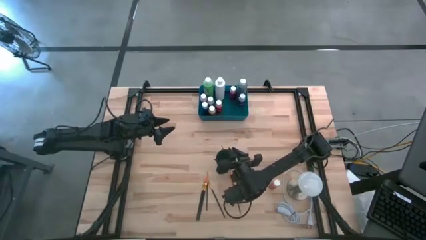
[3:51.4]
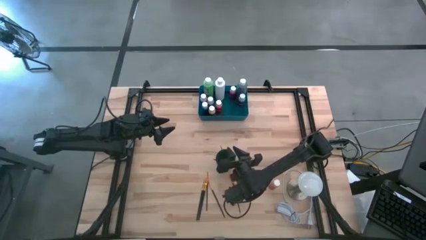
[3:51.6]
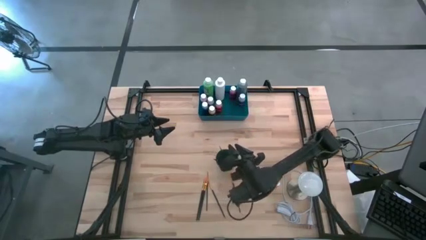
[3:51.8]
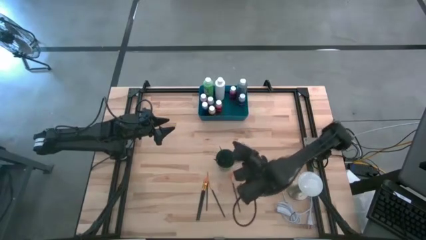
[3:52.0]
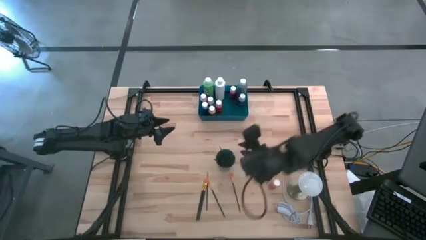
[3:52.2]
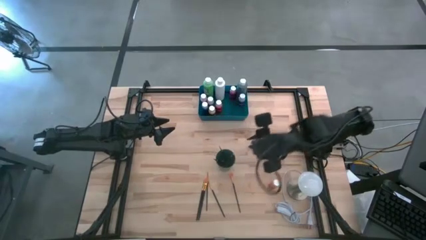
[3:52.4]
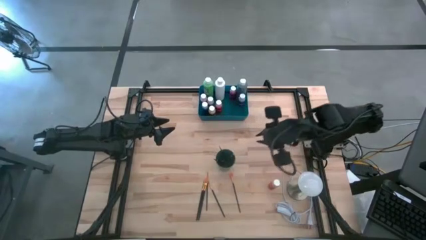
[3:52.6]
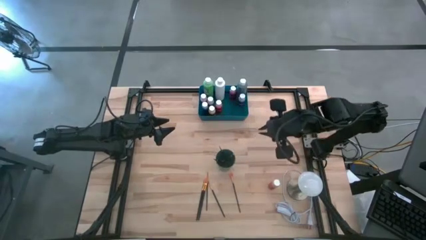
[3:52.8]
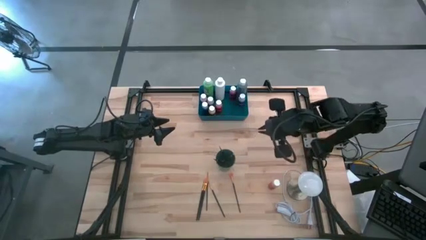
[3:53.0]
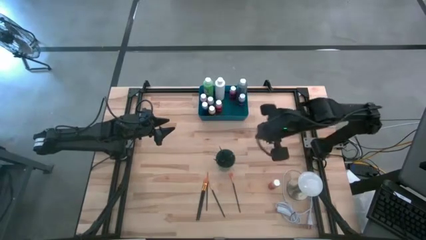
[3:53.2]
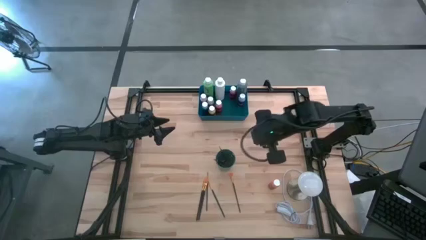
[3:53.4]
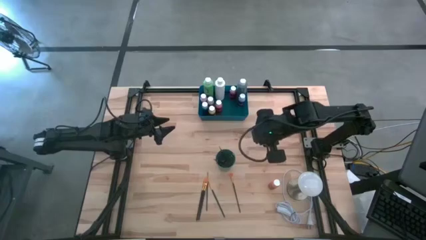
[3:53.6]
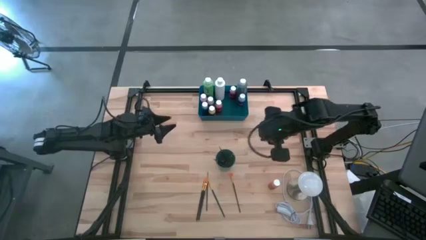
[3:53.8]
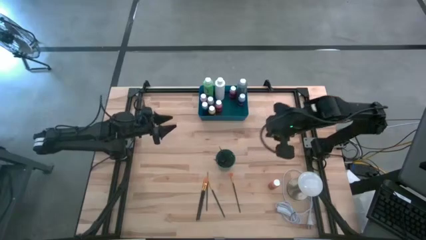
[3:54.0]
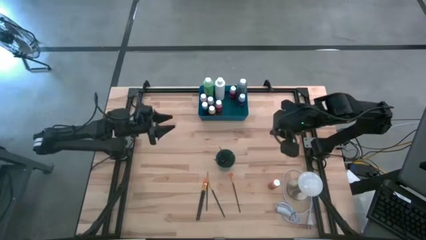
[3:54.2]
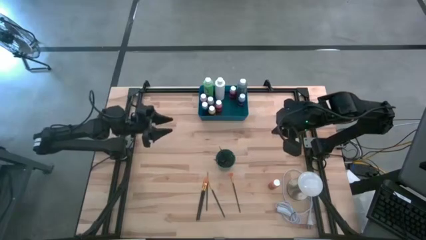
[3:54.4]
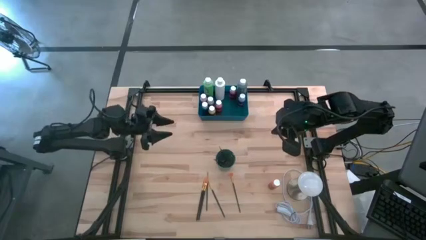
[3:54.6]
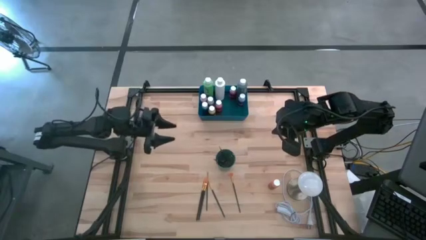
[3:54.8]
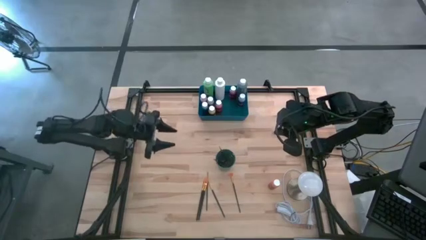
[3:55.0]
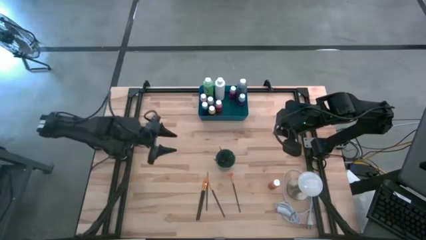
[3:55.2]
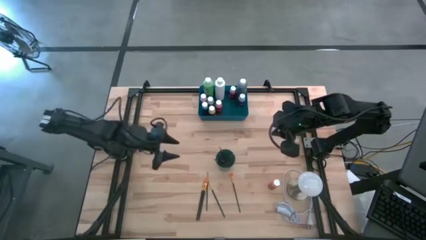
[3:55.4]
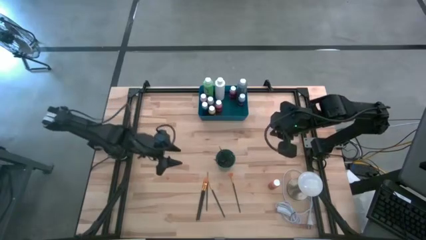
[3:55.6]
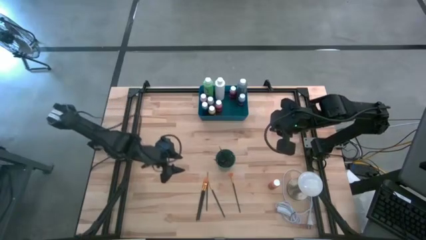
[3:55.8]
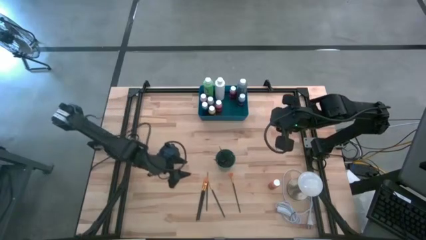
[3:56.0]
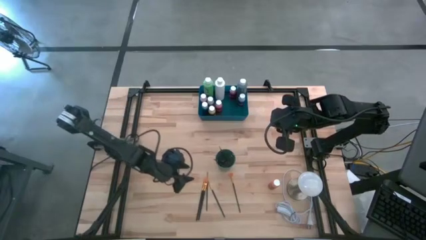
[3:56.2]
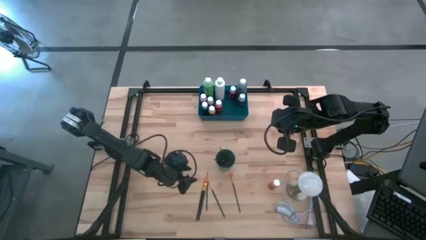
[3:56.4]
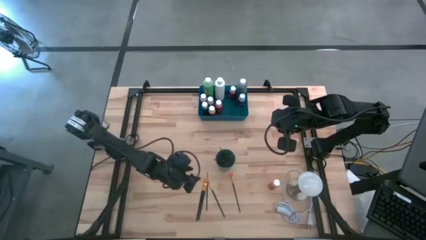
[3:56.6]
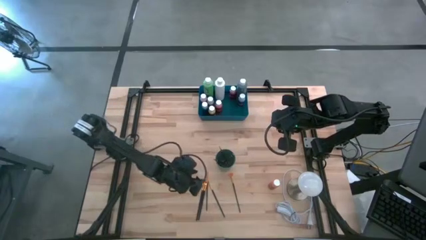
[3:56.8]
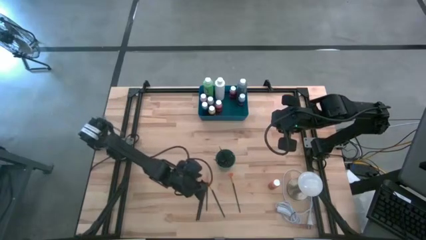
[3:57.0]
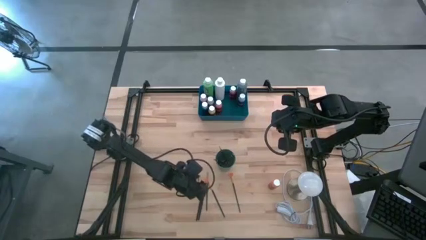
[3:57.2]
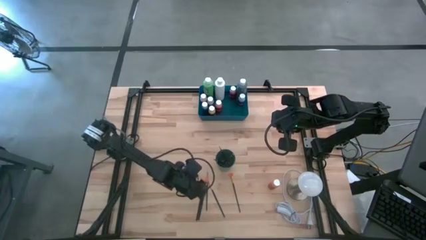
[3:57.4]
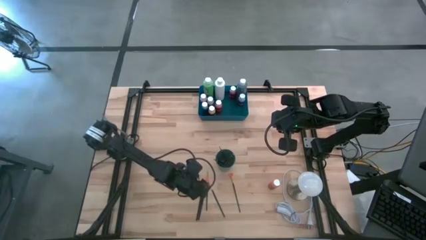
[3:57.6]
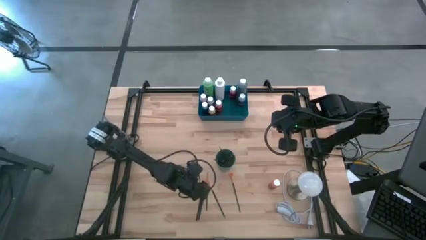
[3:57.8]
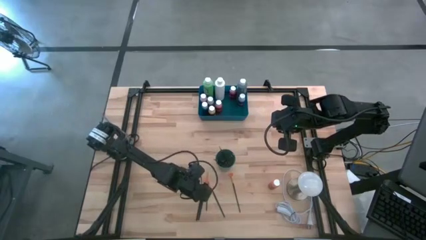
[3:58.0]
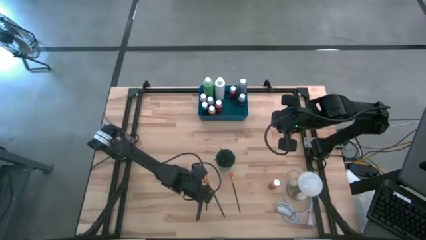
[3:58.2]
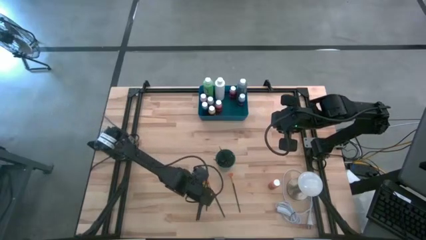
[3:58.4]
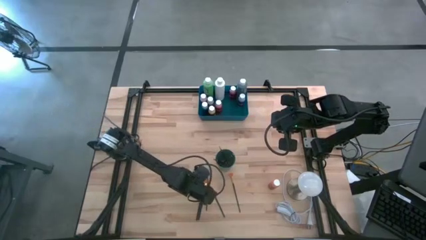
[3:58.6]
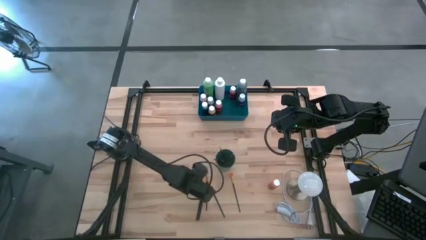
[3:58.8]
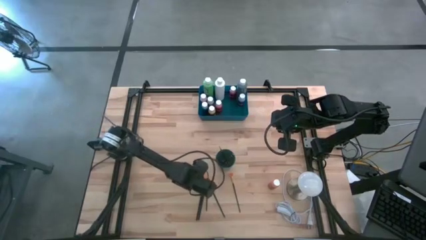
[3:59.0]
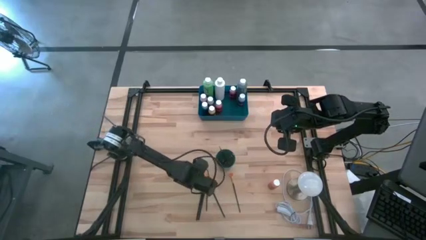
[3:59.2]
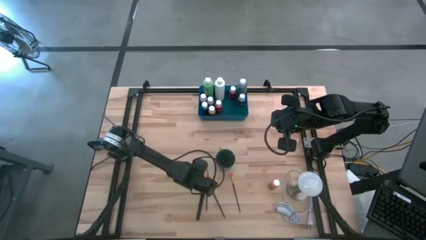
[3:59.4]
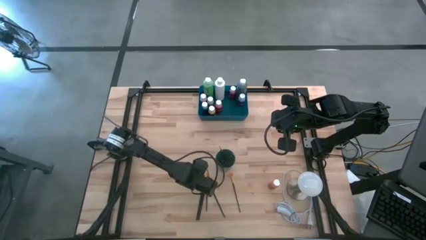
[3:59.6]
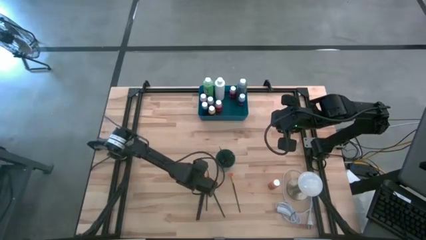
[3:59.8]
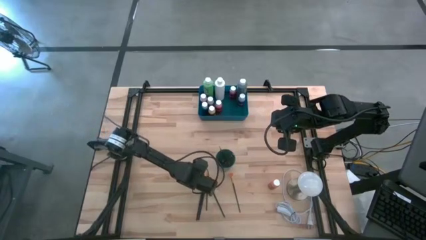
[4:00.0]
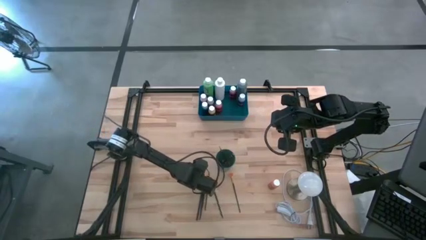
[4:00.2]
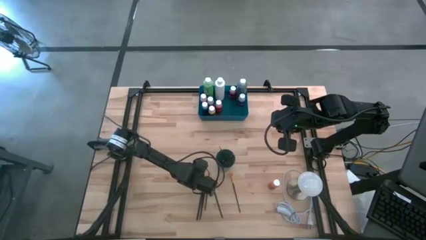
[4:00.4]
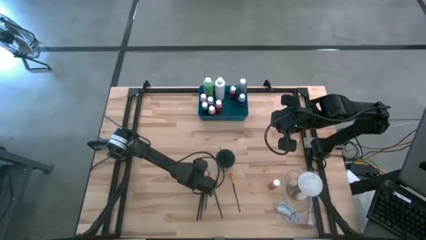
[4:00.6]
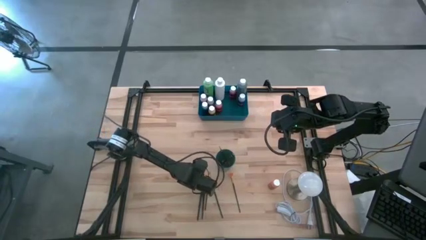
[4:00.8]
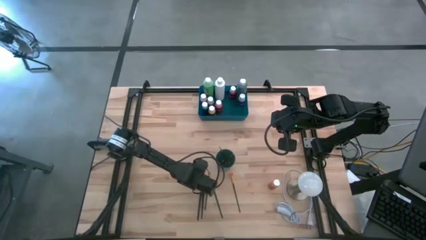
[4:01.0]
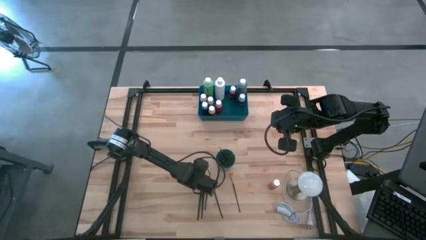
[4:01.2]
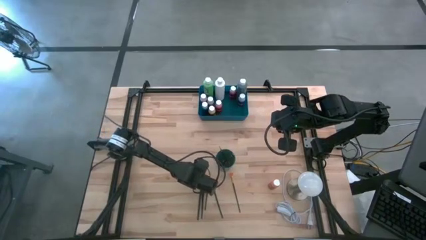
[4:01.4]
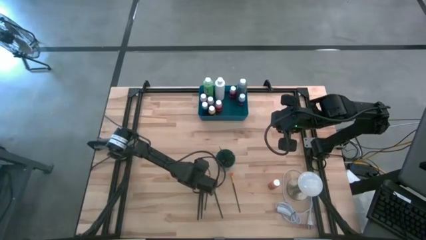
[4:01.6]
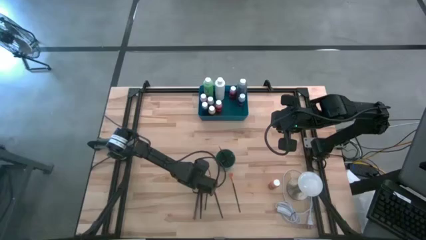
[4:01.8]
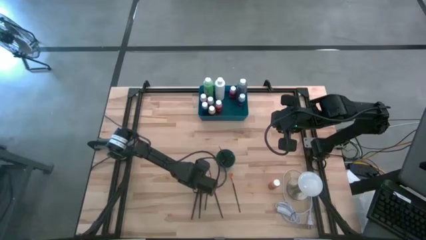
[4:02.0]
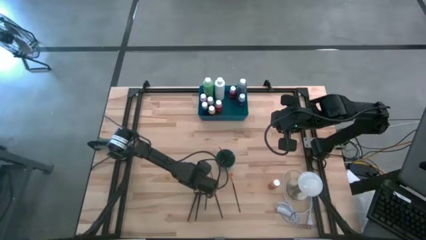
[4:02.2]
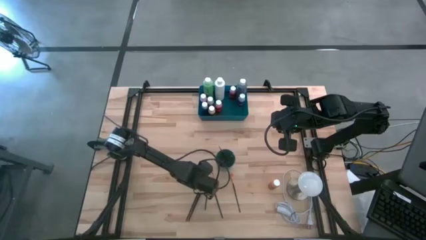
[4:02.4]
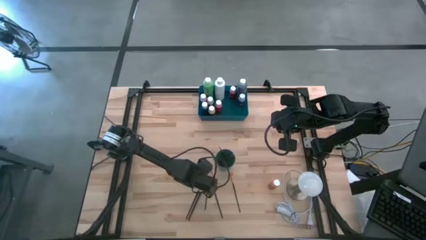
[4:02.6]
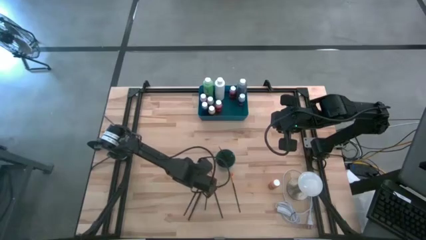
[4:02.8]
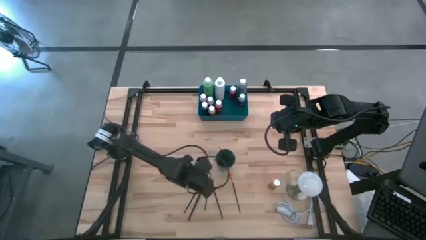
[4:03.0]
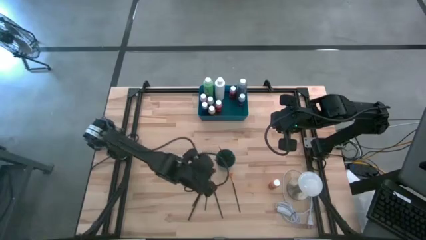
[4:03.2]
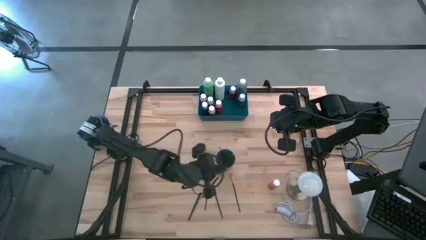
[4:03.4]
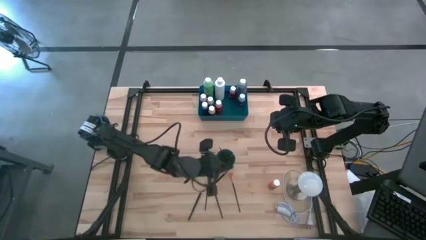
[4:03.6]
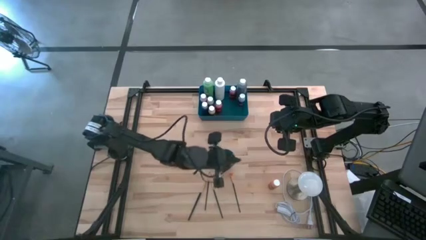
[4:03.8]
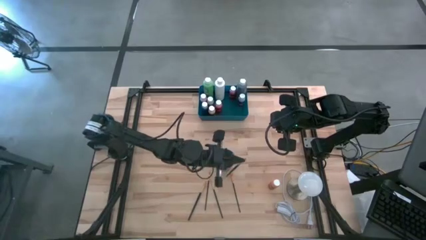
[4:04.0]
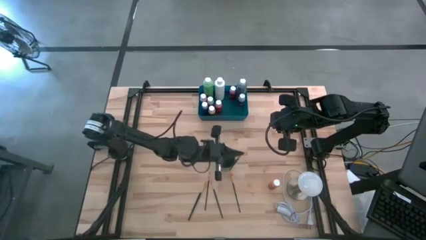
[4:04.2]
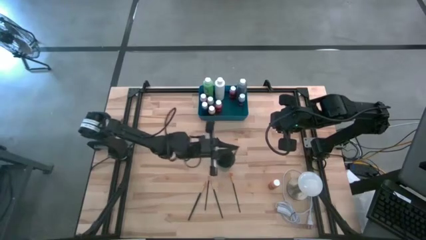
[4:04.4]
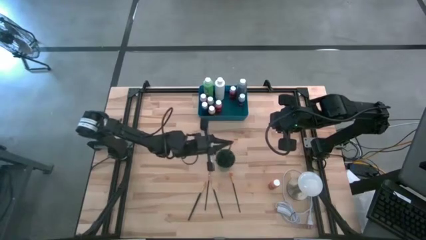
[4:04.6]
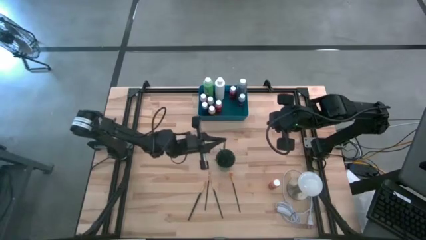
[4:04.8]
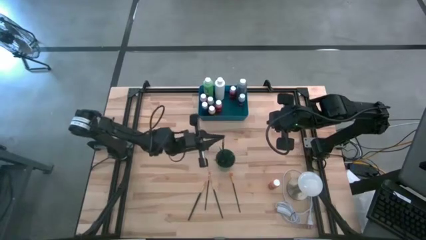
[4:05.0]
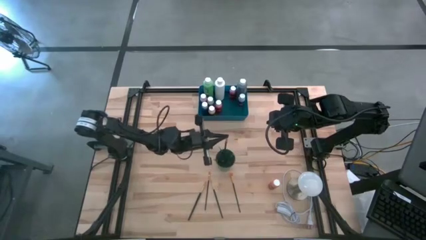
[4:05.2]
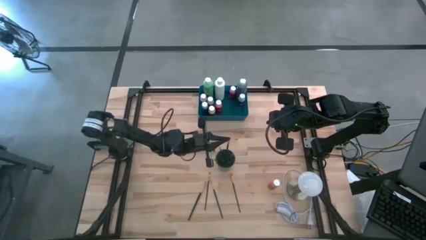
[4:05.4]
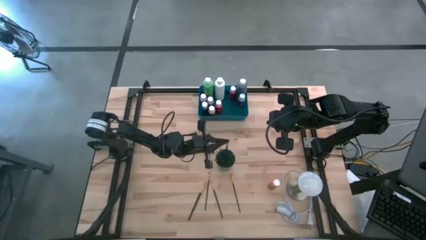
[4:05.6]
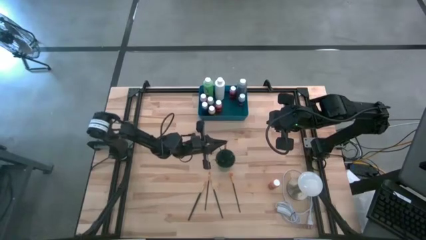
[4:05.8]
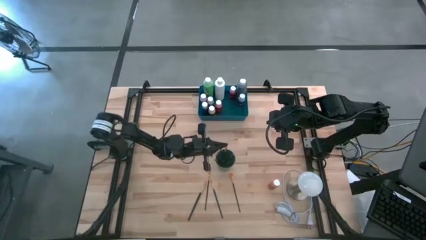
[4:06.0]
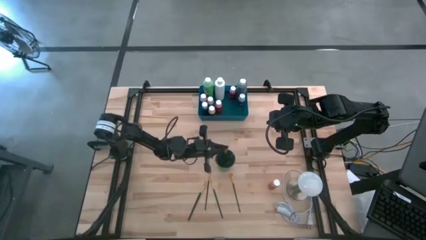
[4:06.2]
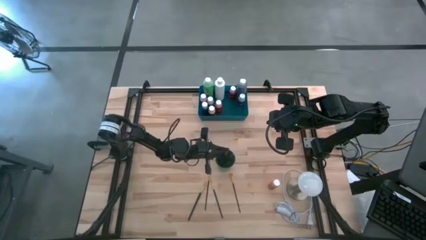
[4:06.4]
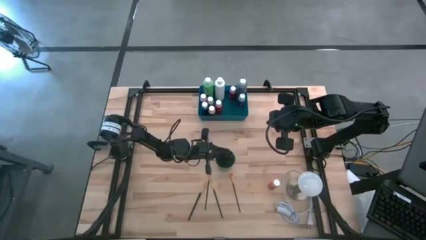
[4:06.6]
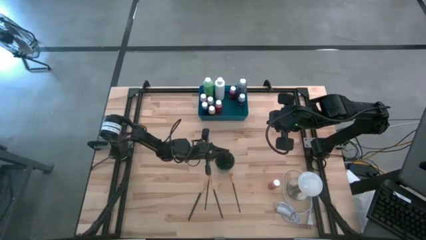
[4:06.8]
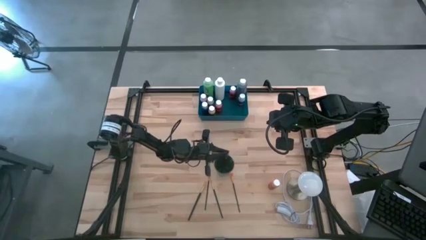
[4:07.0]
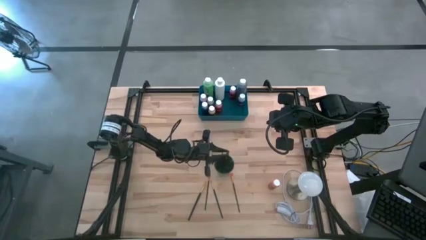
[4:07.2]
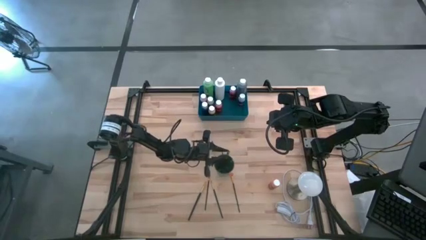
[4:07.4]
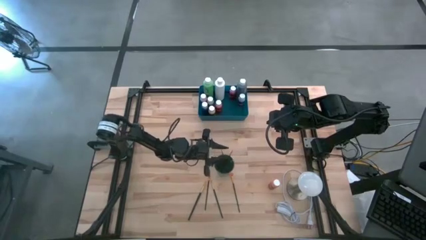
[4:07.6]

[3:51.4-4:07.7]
Task: Pick & Place Paint Supplies
Put the yellow paint brush into the green cup
